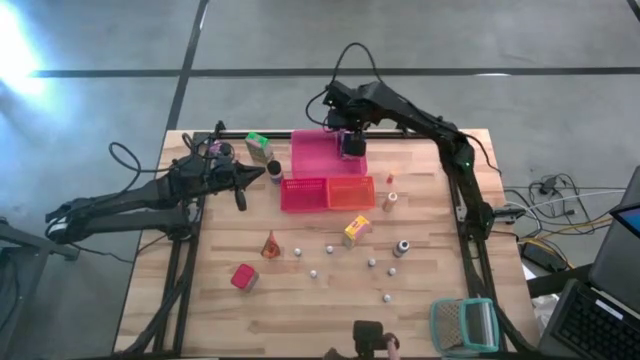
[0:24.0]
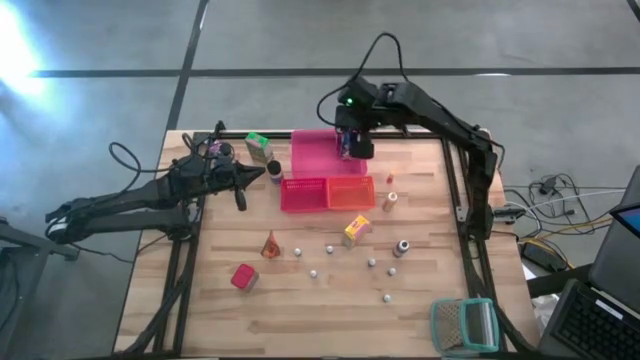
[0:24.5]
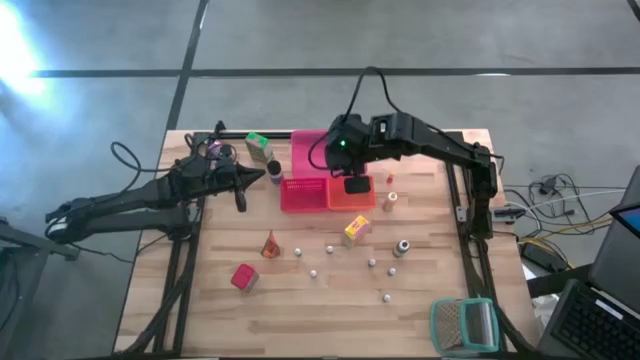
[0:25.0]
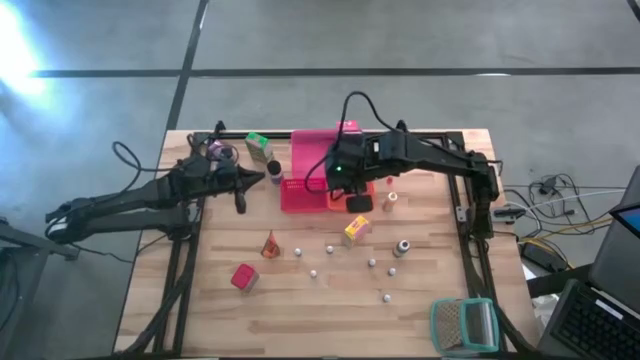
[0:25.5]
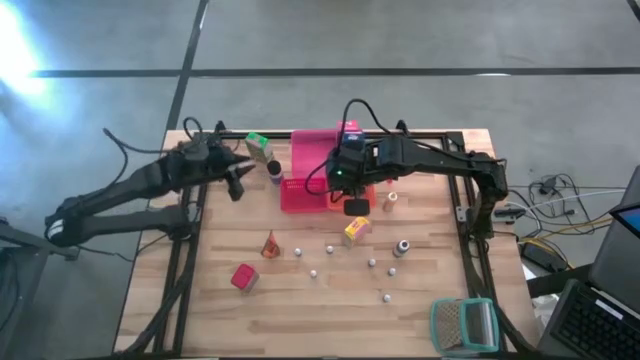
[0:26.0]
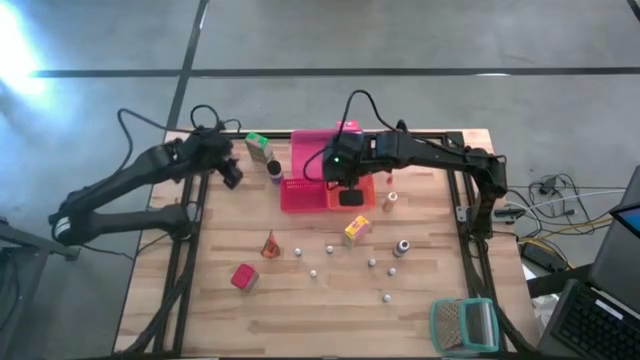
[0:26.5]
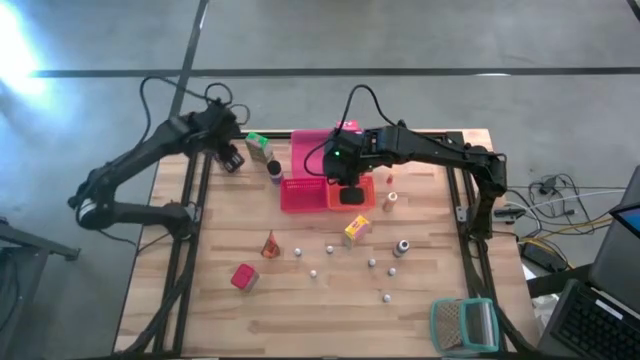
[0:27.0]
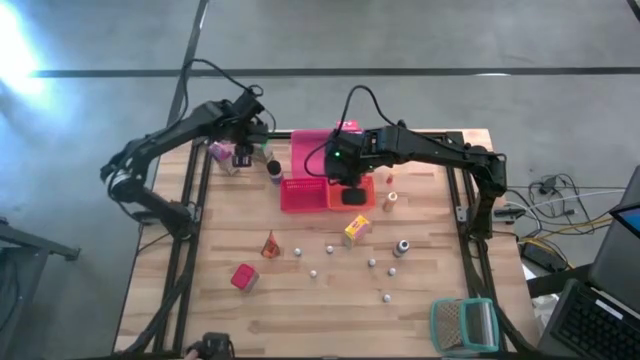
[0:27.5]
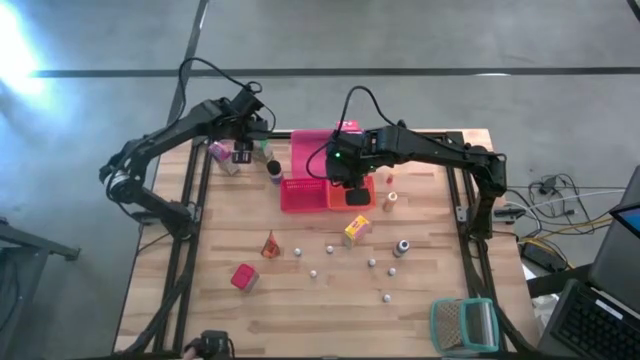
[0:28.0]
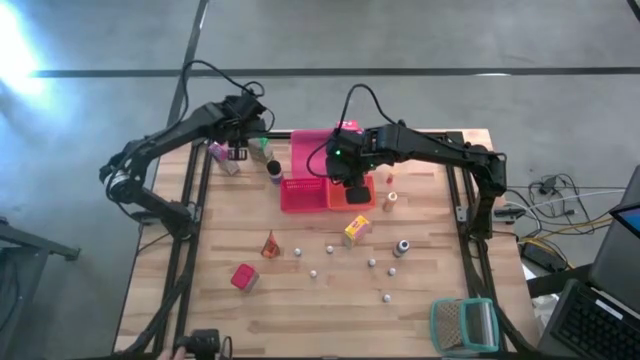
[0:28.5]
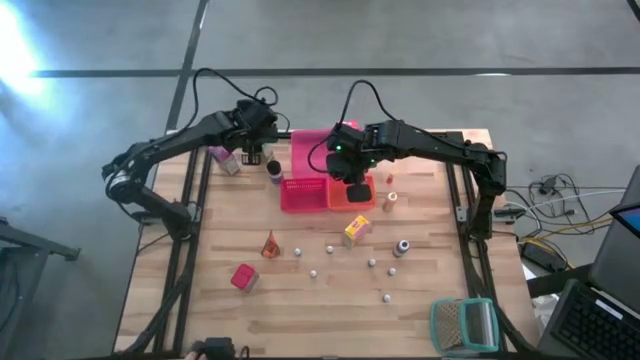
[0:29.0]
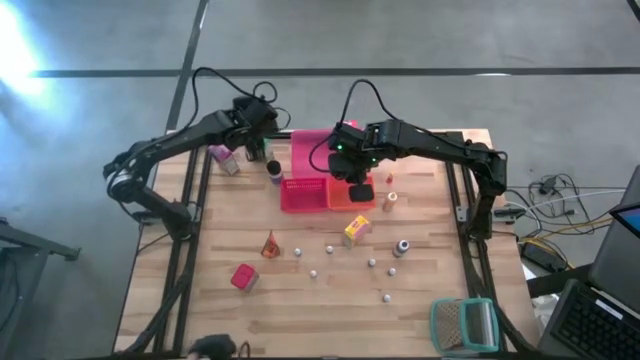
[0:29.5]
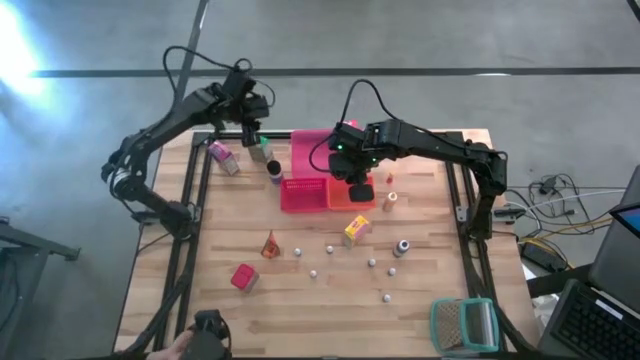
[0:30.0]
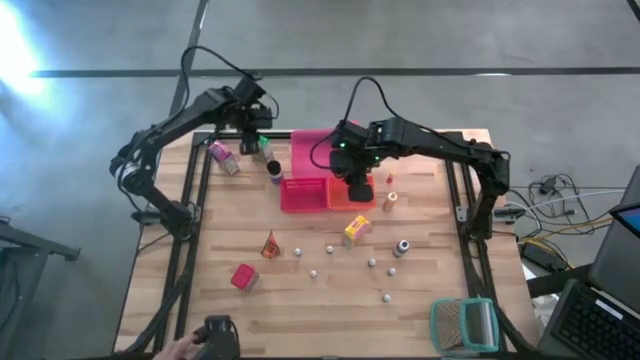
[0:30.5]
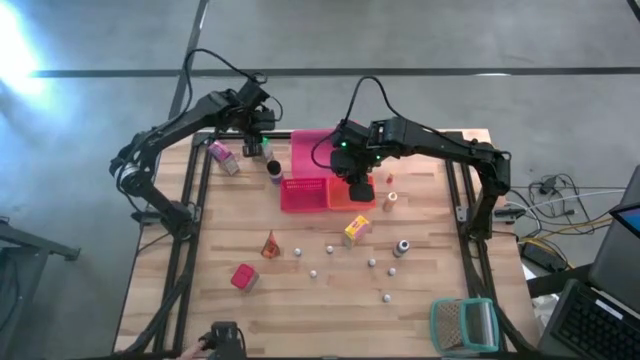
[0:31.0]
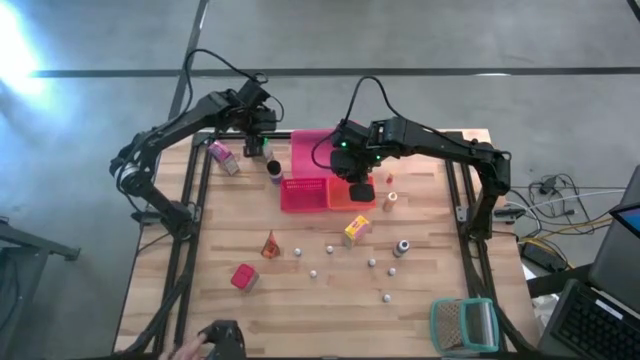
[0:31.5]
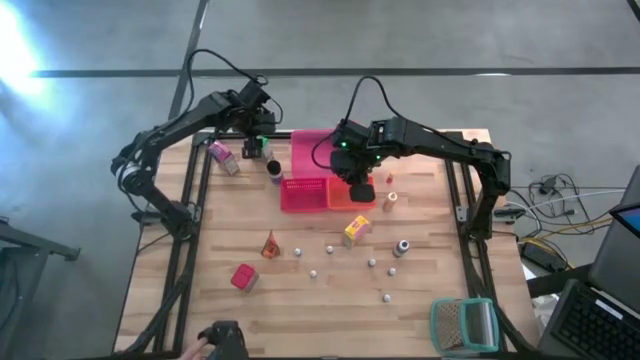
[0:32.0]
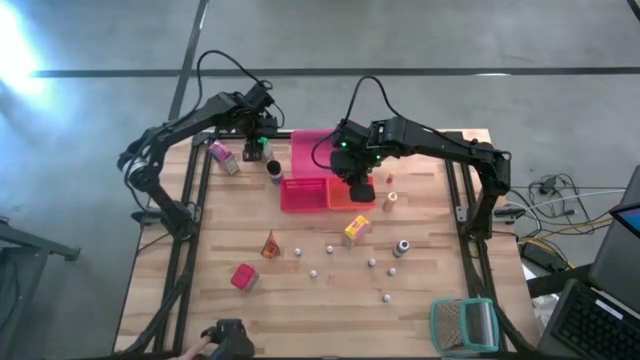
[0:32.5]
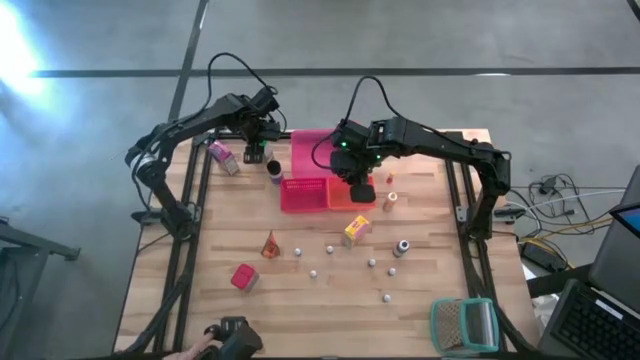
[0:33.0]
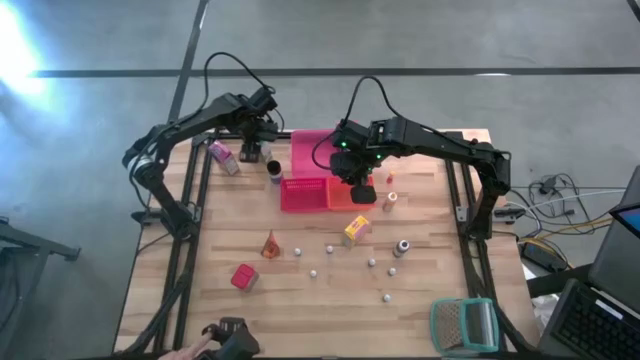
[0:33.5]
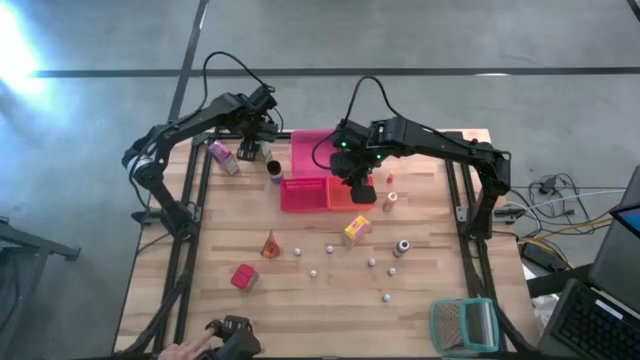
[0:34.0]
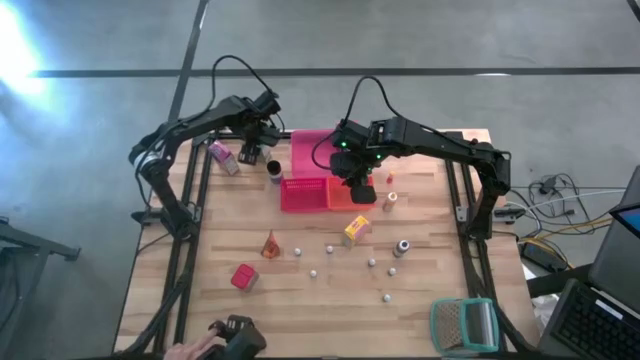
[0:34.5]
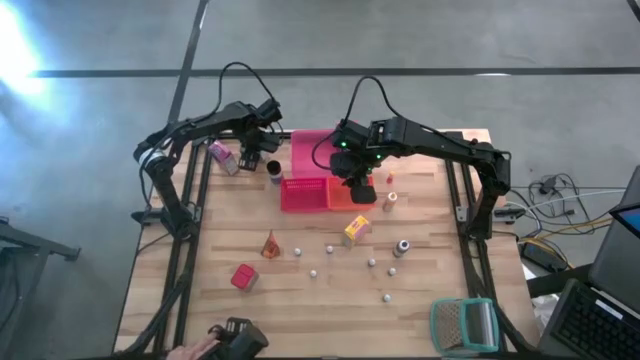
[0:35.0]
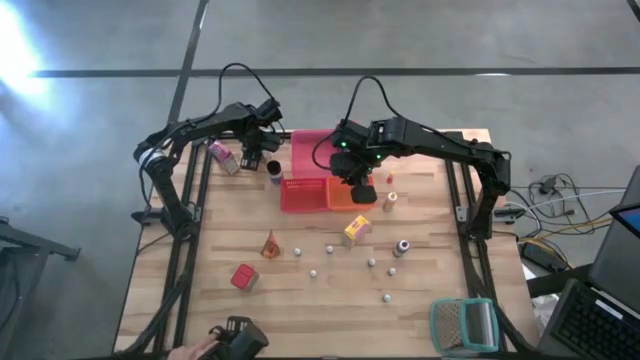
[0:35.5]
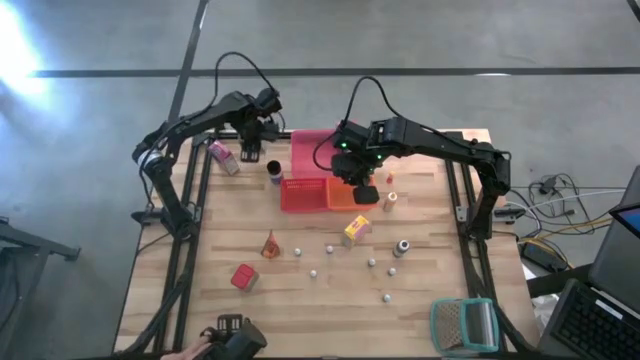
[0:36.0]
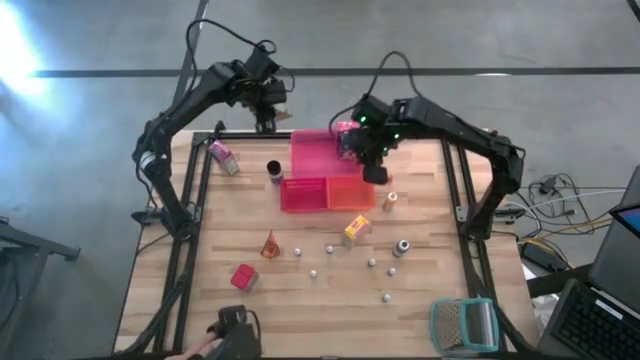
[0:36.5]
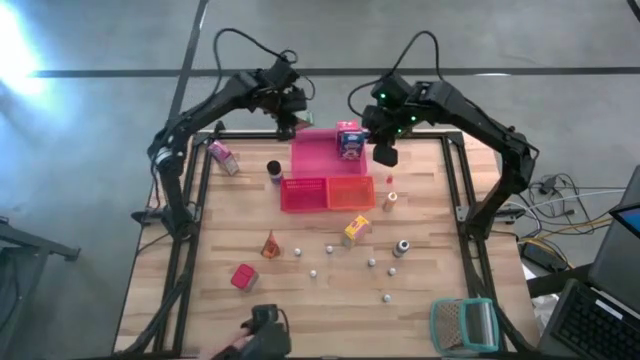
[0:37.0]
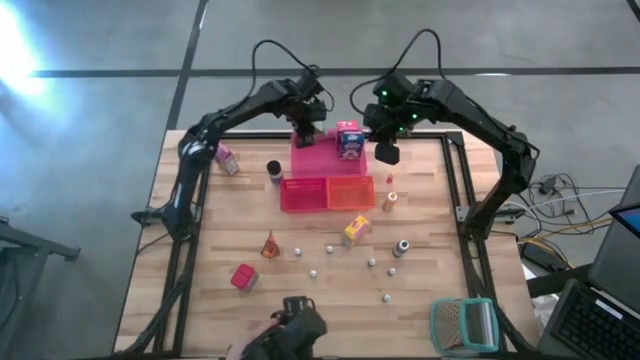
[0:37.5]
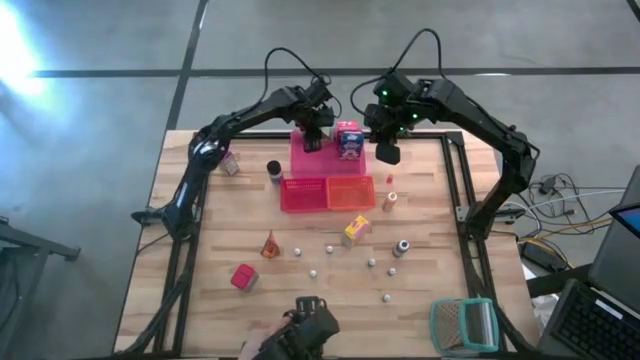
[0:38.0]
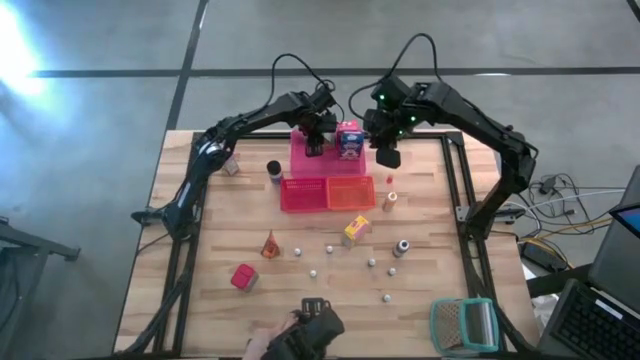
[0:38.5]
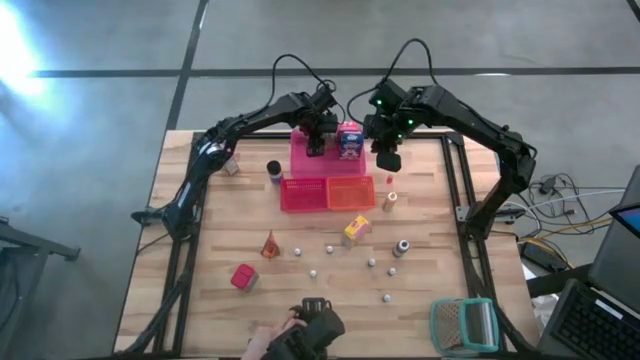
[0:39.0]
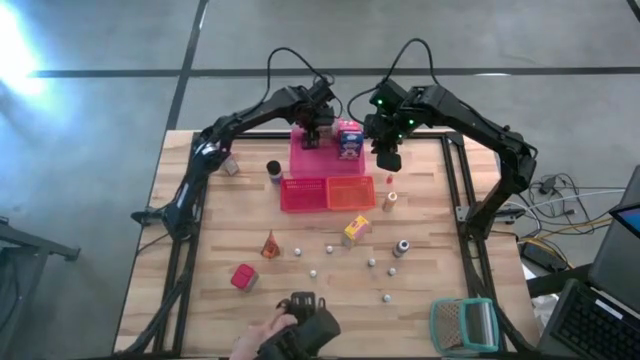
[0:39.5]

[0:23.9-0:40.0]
Task: Pick & Place Kitchen Items
Put the green cereal box into the pink bin

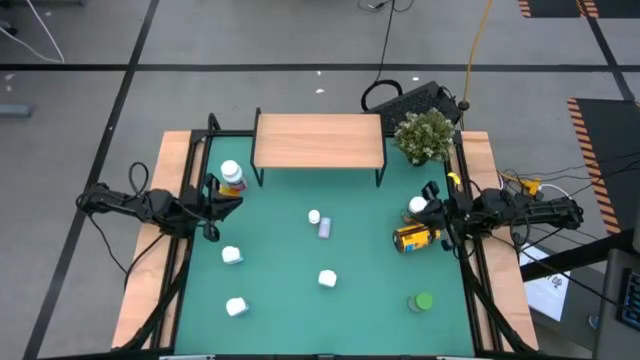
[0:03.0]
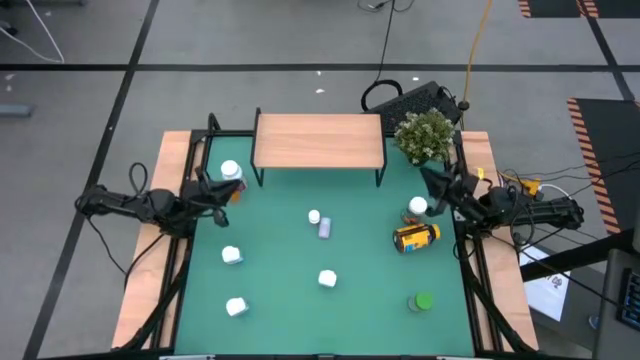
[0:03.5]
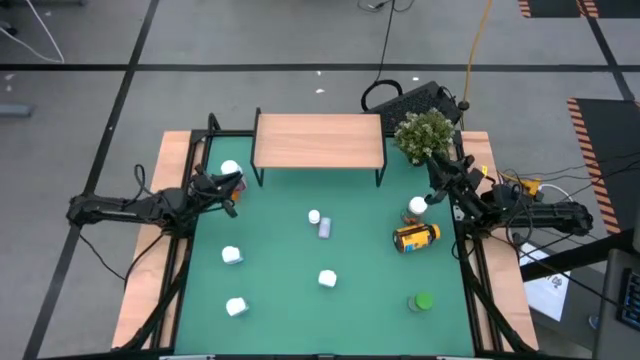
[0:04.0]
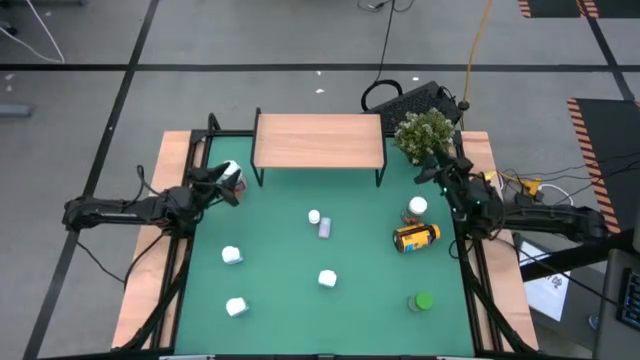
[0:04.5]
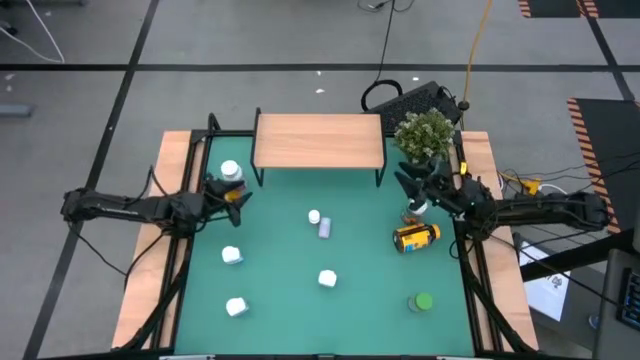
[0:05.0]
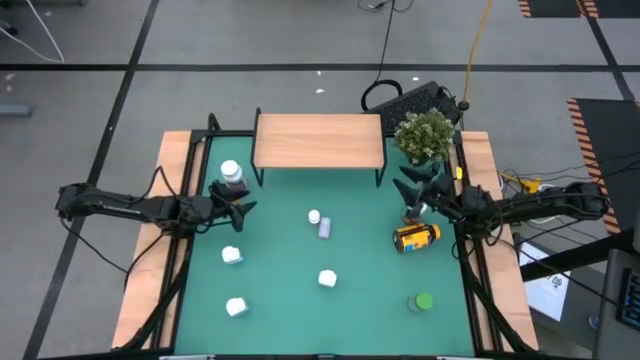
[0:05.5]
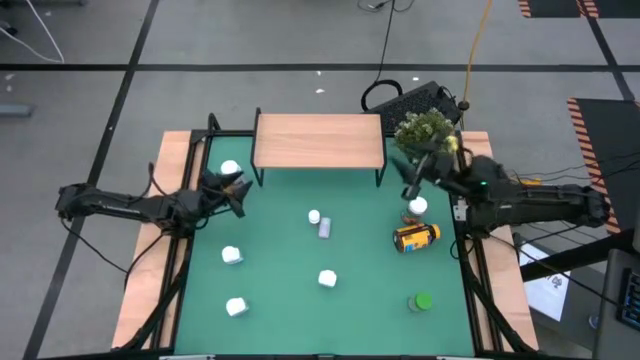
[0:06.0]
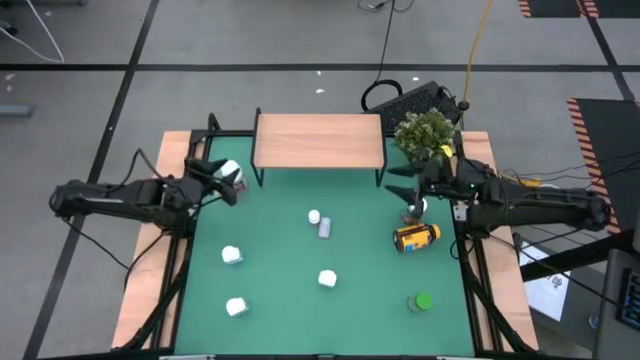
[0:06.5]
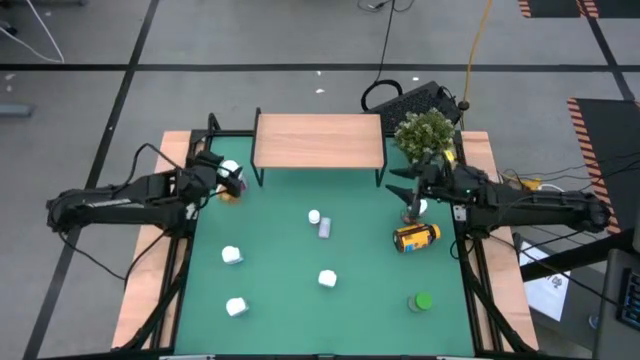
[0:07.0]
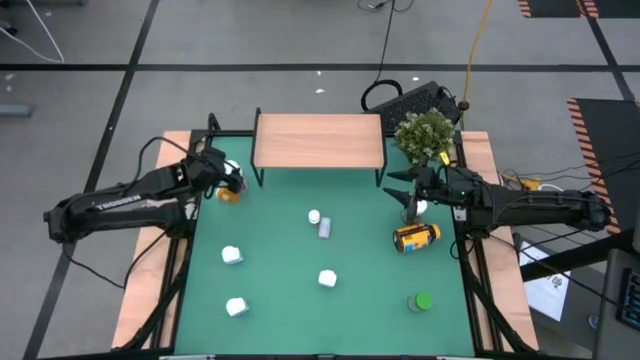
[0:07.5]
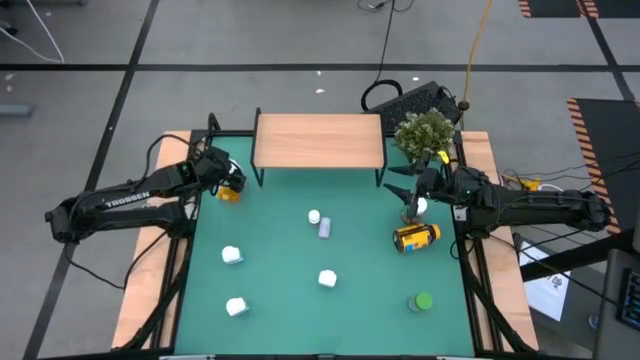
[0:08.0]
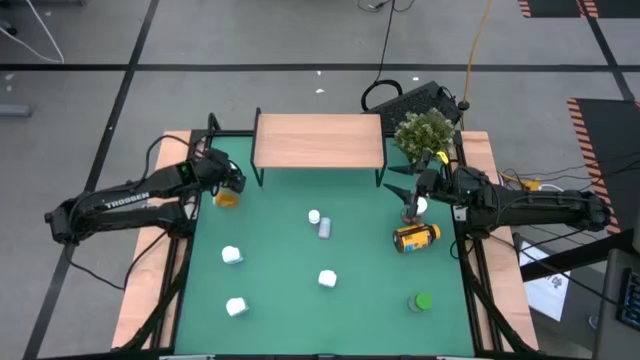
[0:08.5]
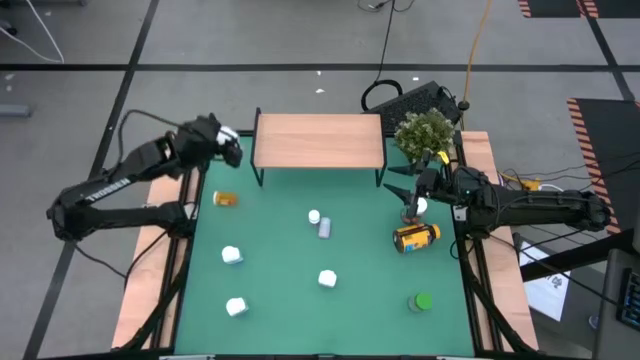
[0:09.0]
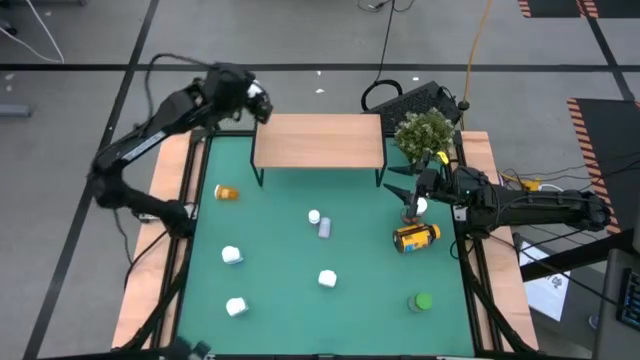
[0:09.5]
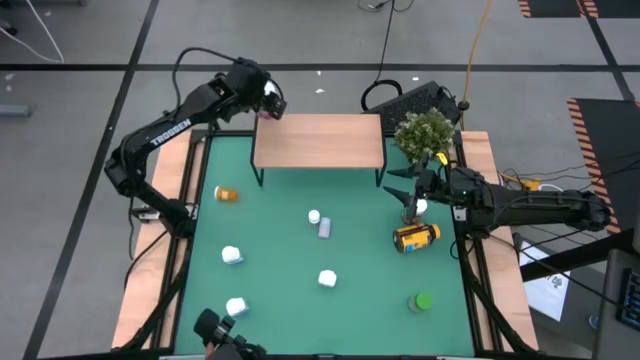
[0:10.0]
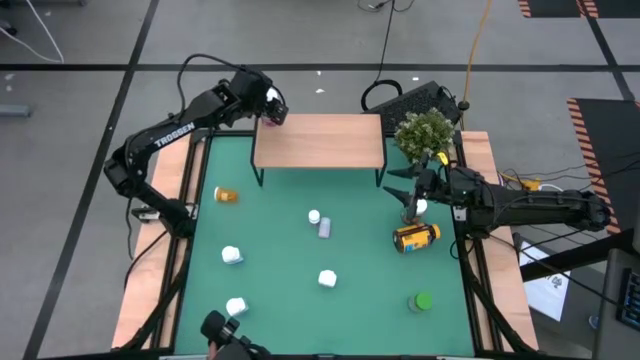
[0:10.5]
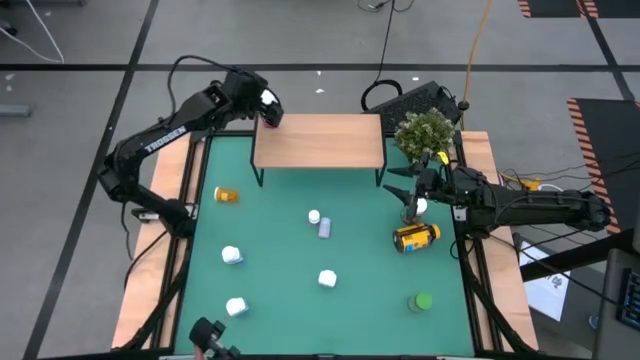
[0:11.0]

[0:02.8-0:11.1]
Task: Pick and place medicine bottles onto shelf by color
Put the white and purple pill bottle on the shelf
